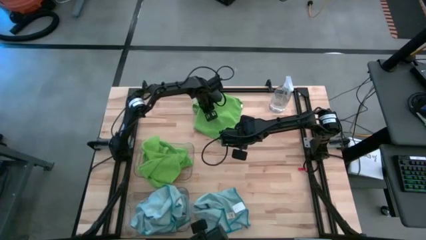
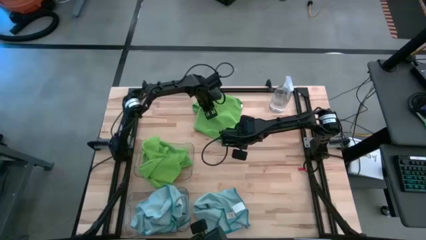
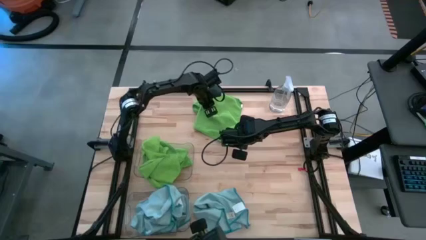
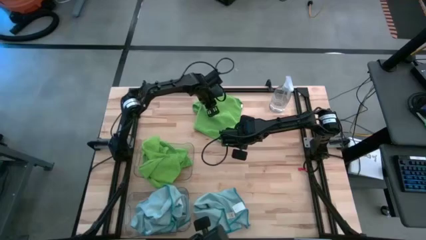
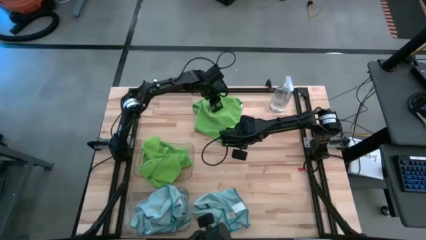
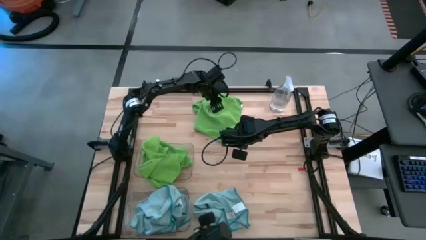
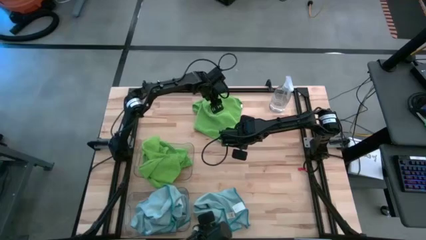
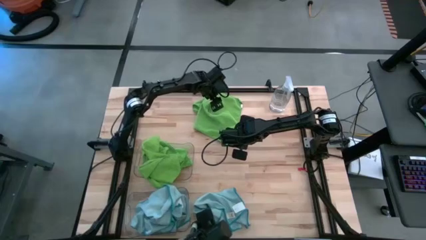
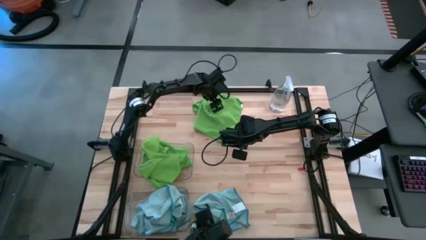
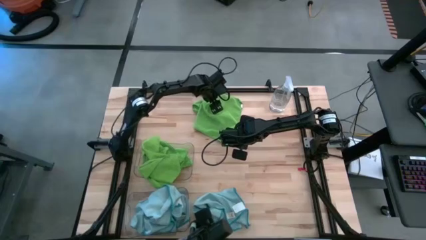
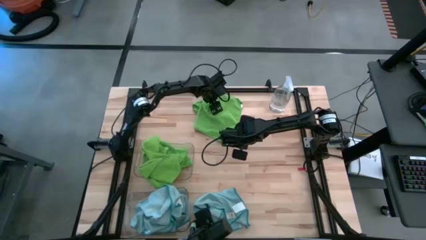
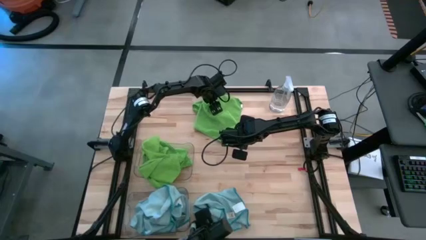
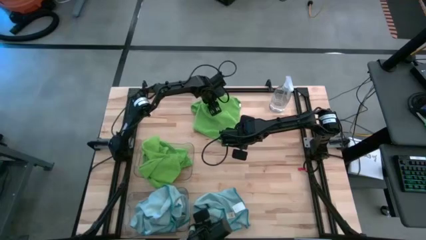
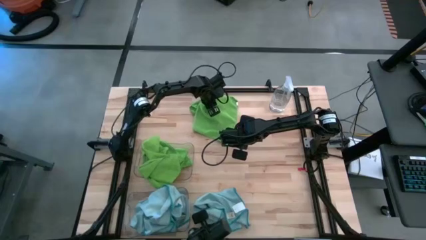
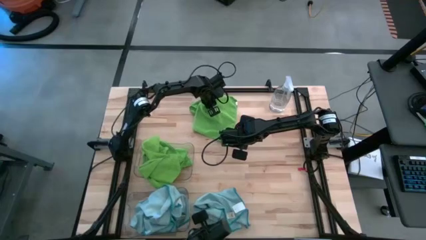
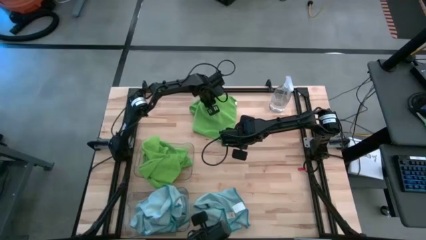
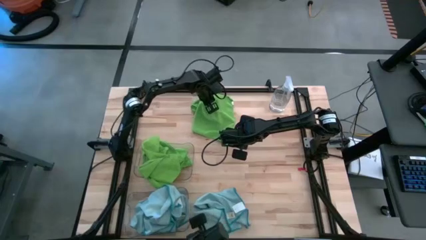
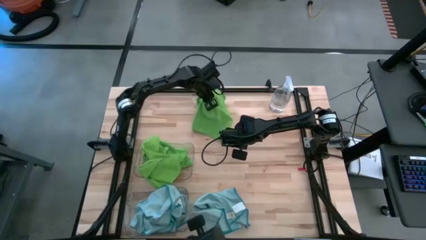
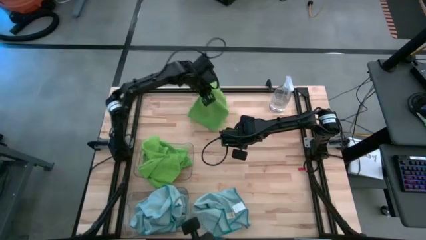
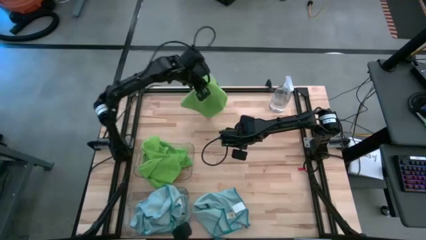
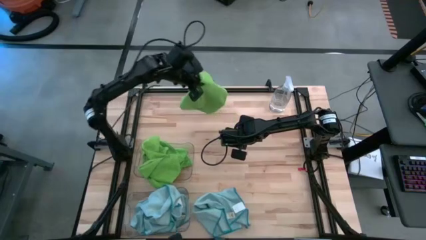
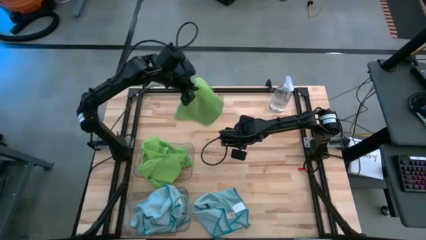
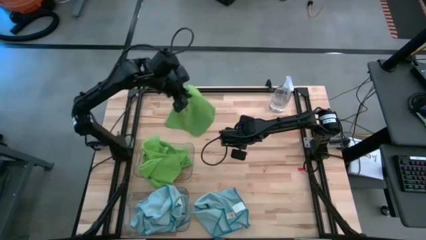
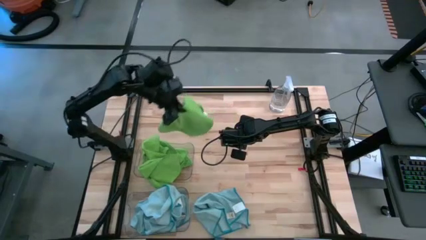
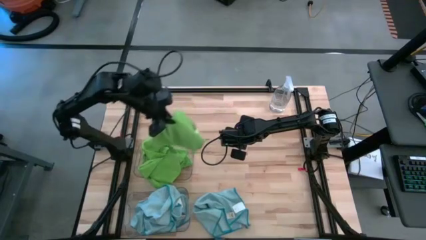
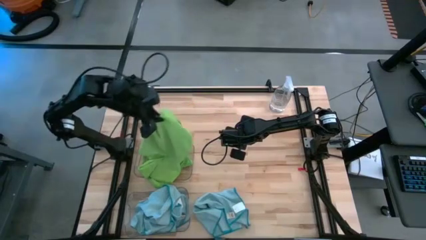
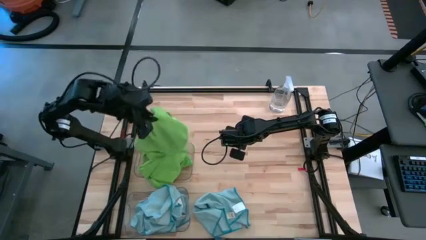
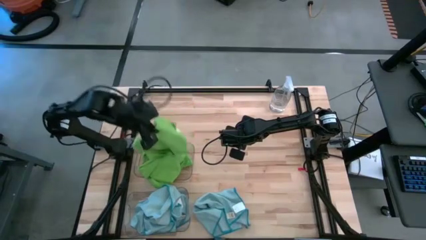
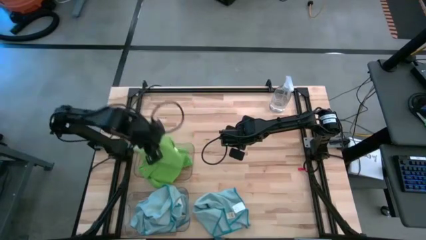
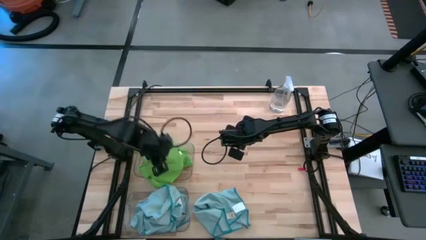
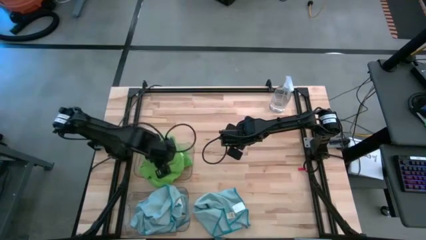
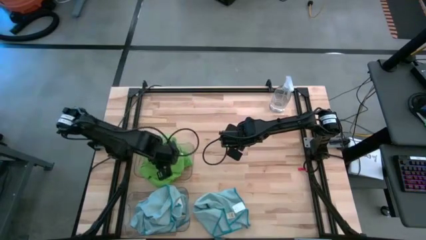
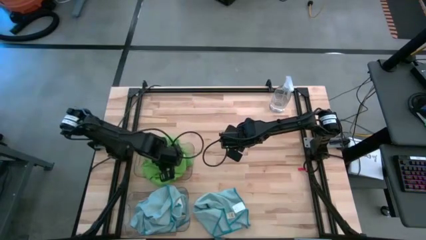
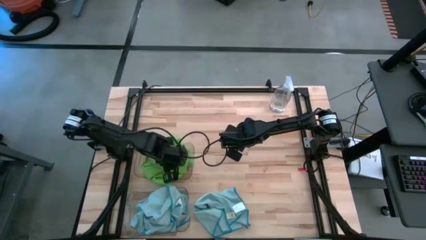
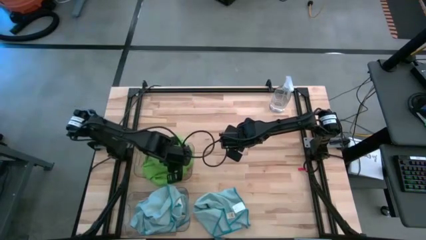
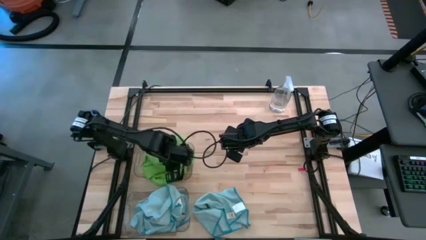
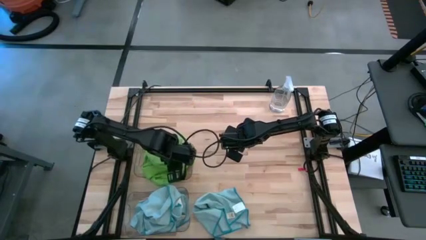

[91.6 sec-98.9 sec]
Task: Sort microfiber towel by color & place in baskets
Put the green microfiber cloth into the top transparent bin

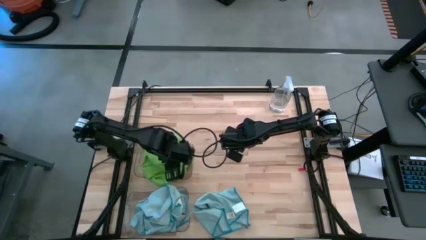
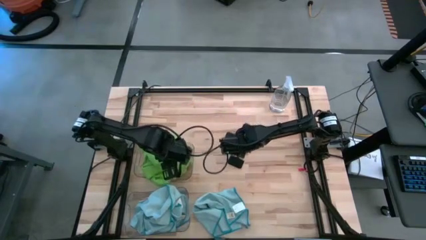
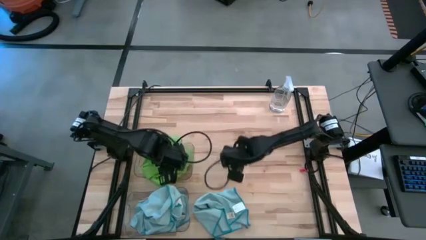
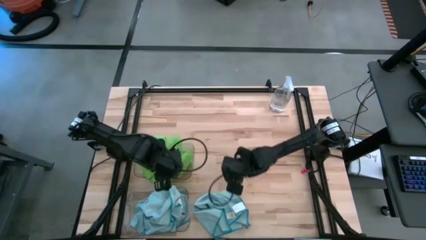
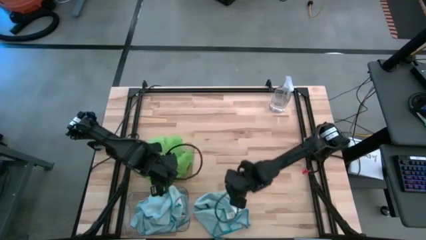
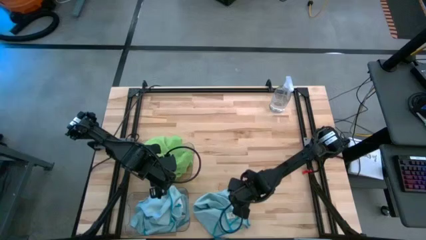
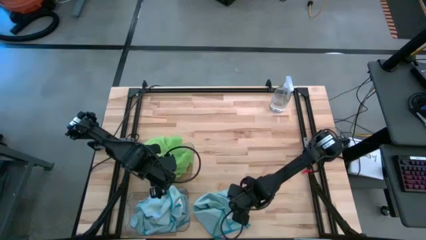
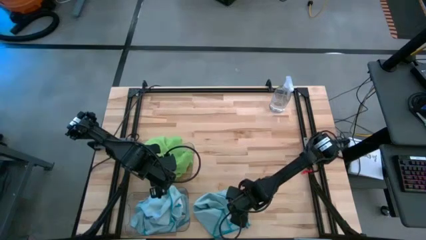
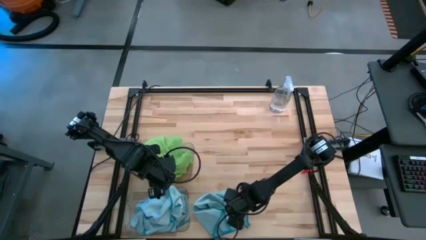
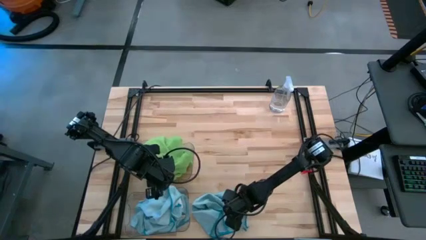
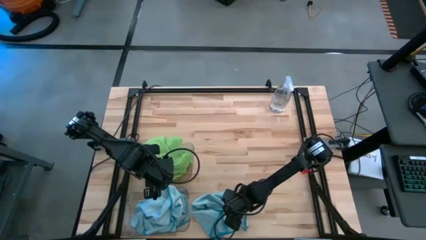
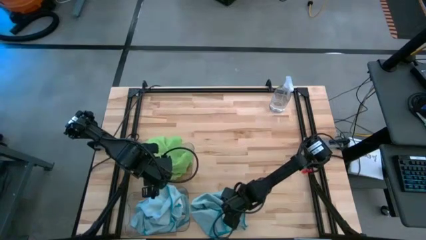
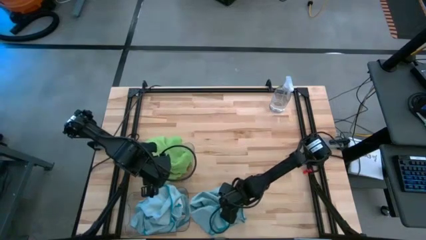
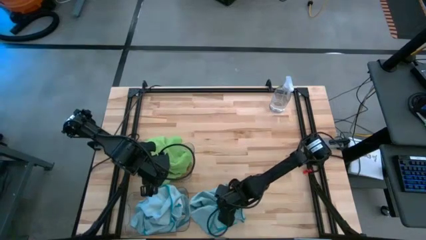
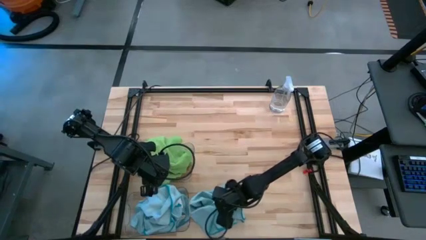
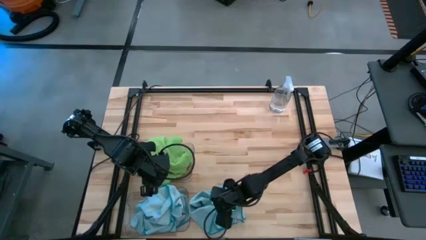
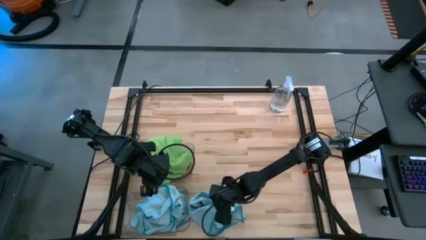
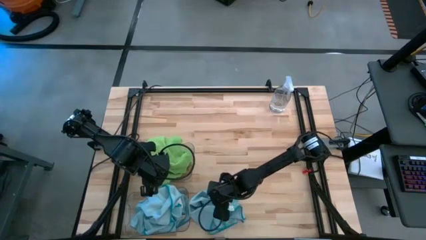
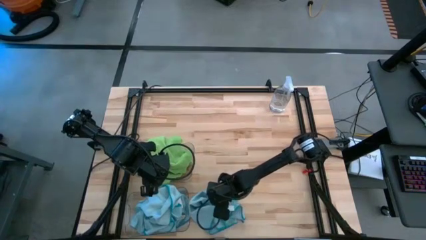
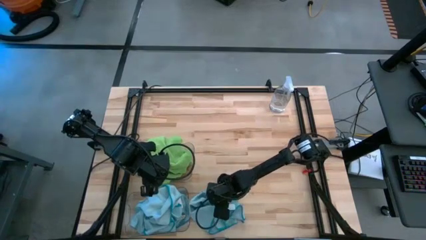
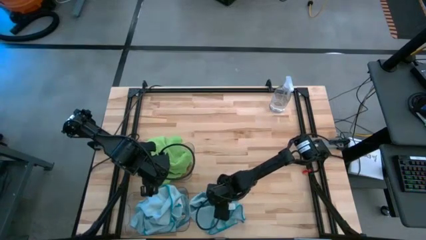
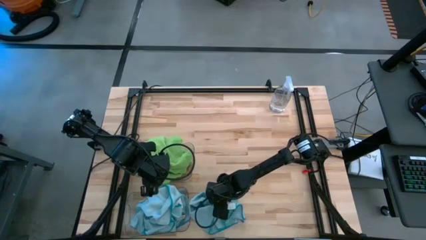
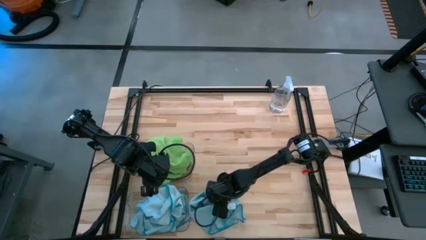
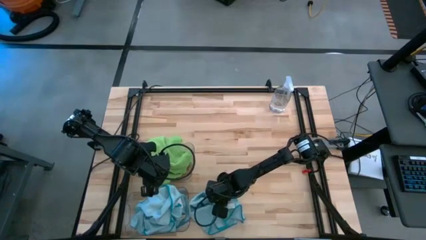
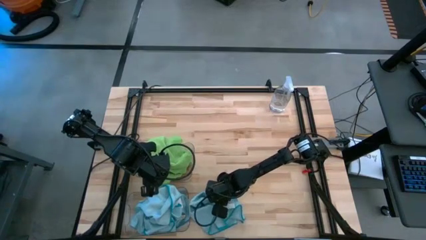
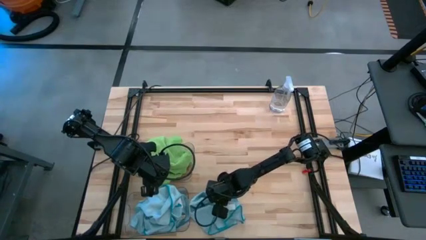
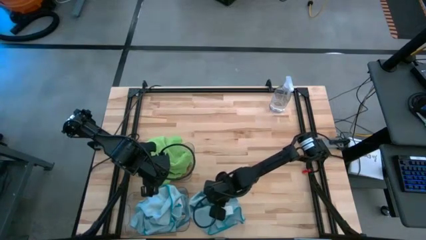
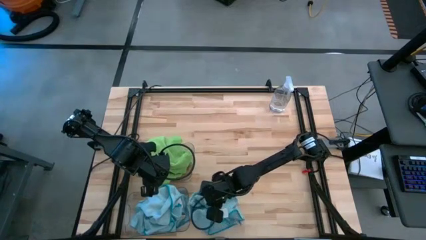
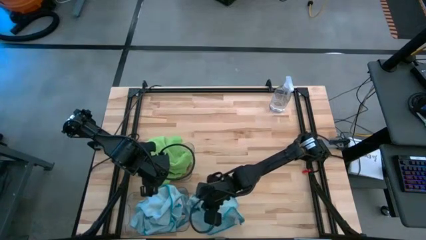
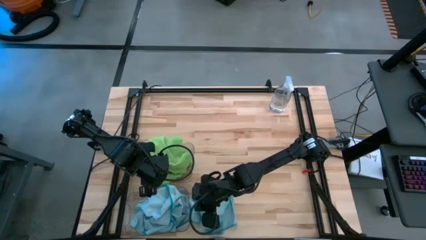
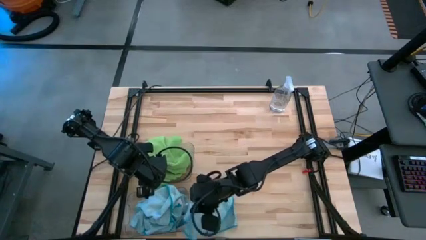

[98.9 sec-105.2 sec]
Put the blue microfiber cloth into the bottom transparent bin

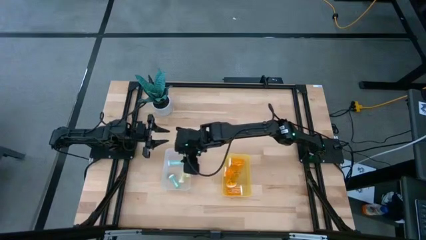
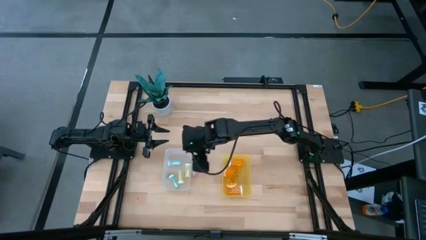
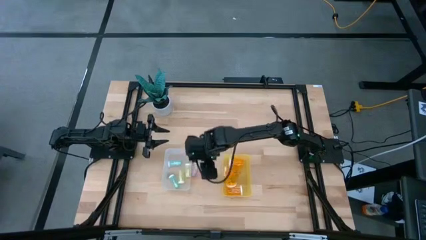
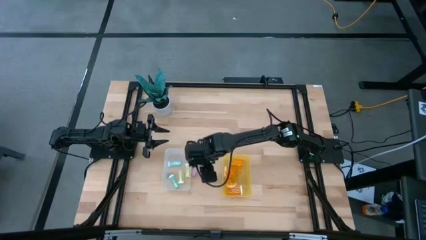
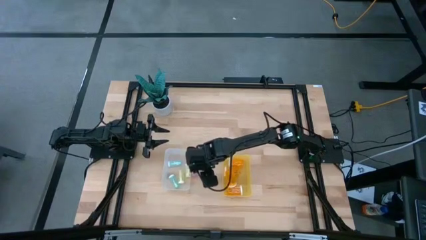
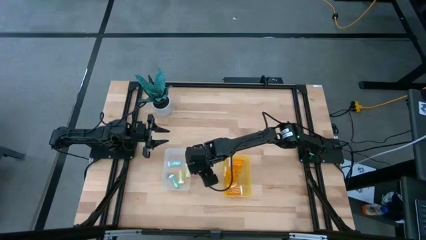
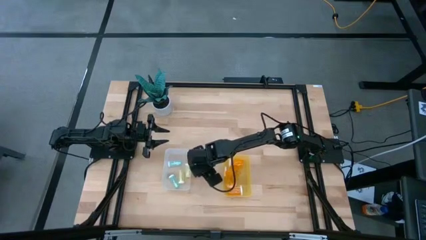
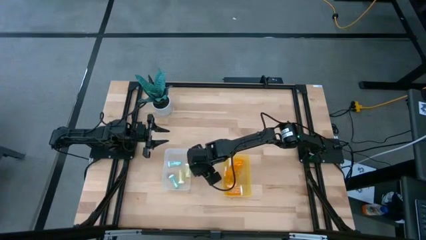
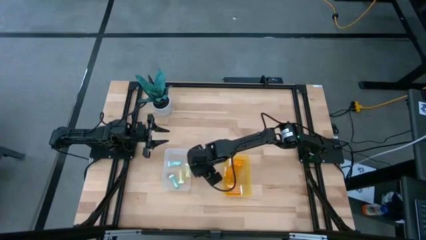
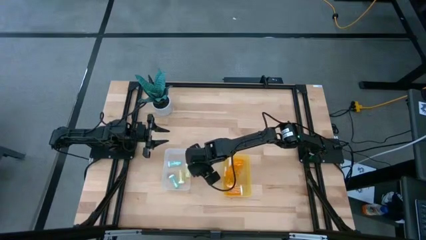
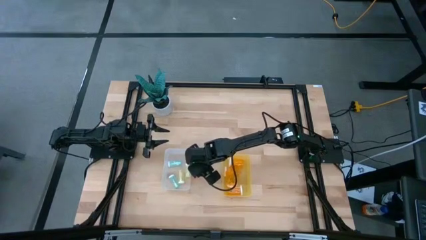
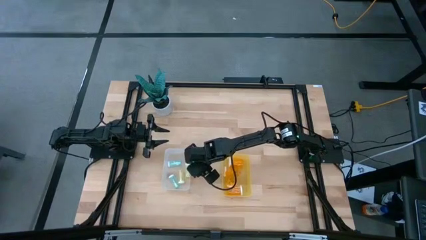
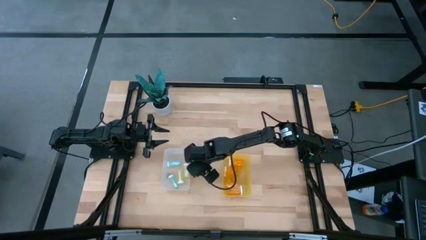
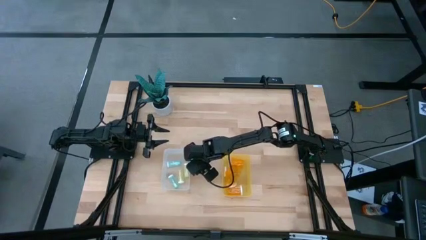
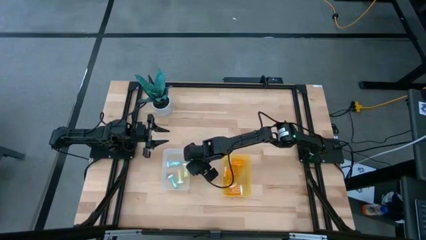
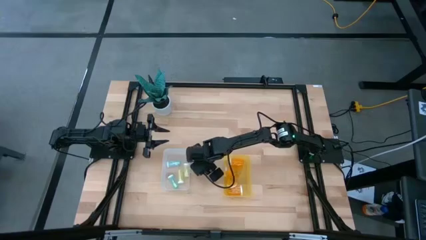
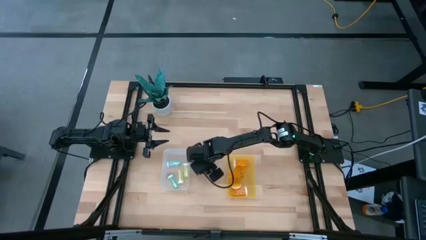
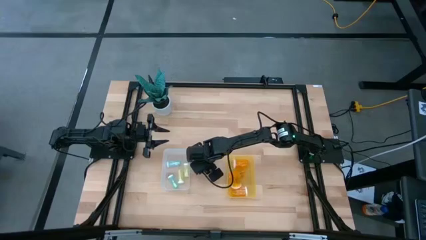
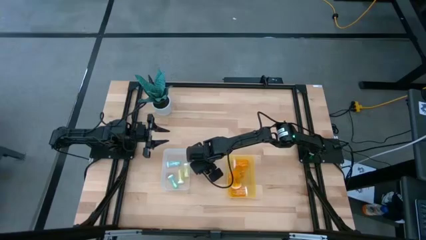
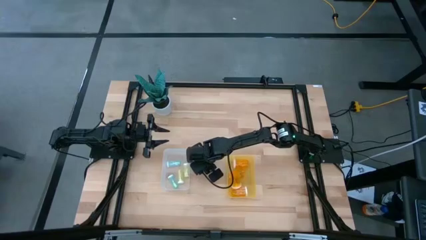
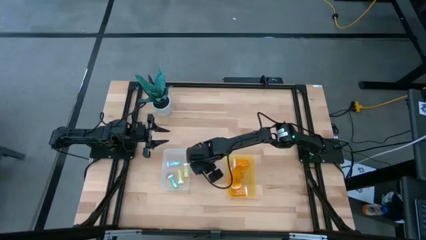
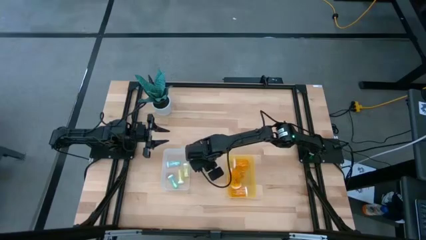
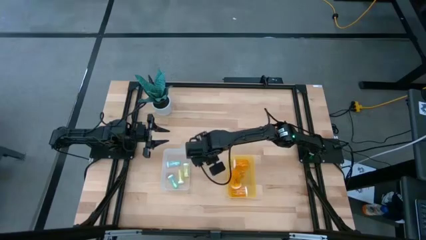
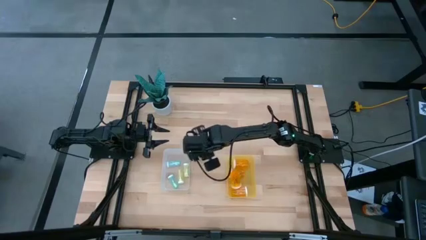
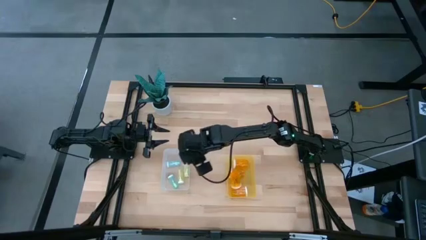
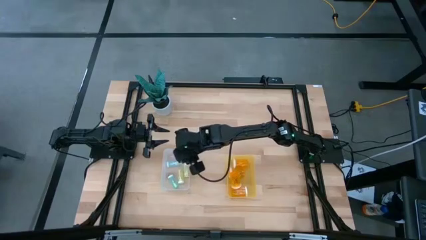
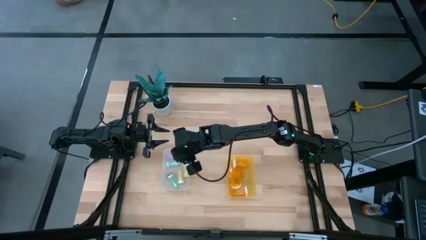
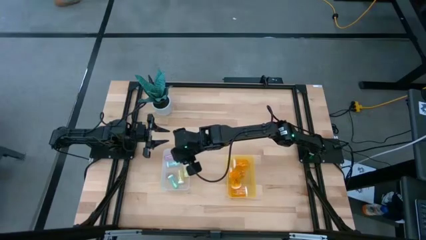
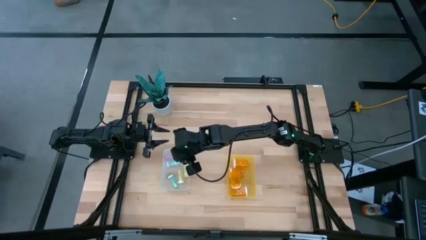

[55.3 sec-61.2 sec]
Task: Pick and place medicine bottles into bin by pill shape (circle, oval)
Put the pink pill bottle into the transparent bin
